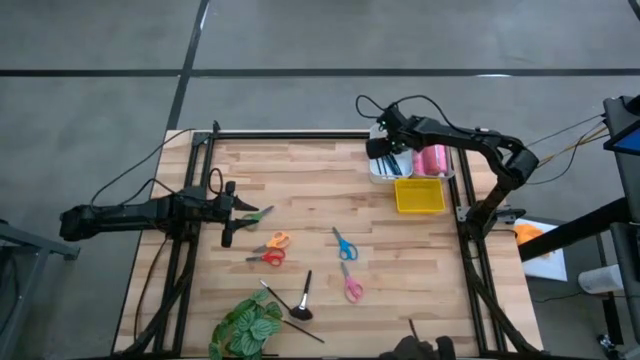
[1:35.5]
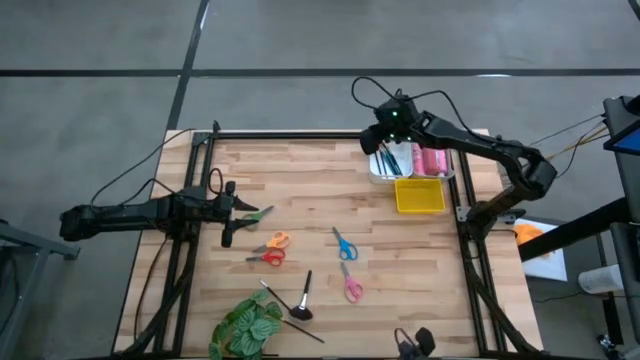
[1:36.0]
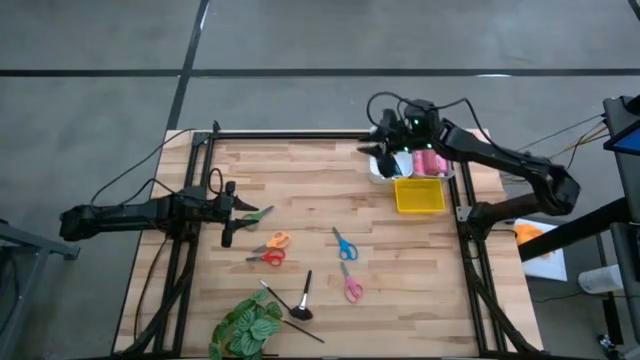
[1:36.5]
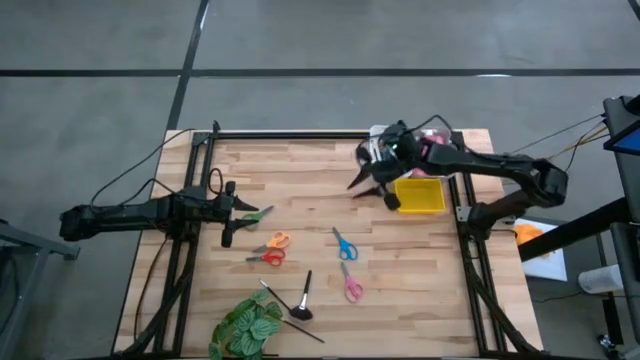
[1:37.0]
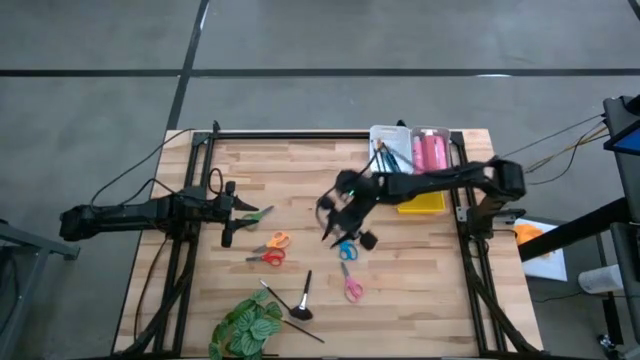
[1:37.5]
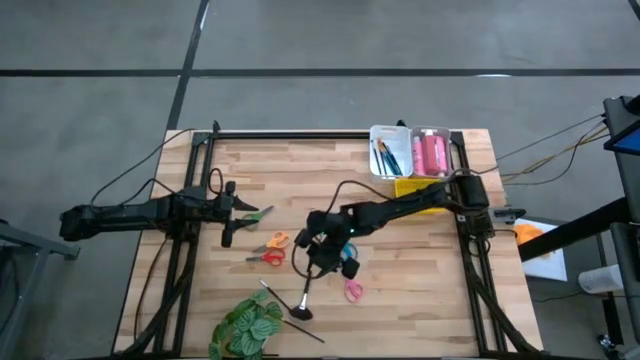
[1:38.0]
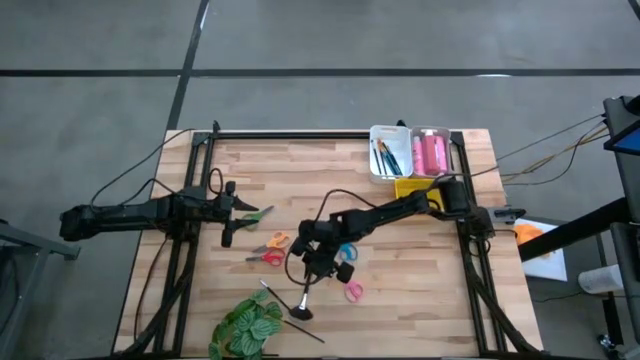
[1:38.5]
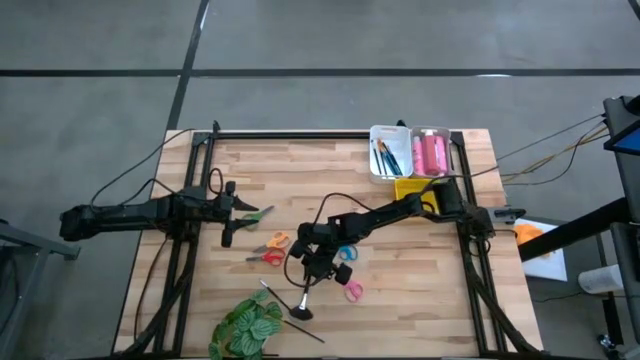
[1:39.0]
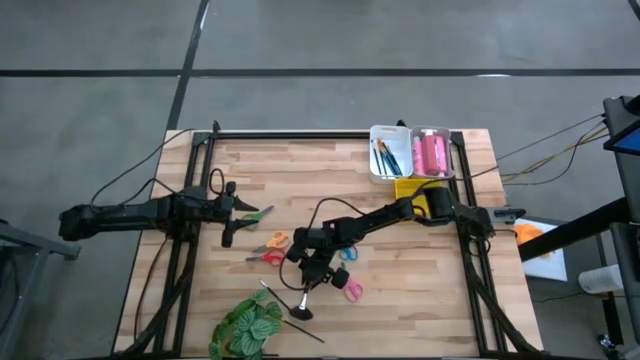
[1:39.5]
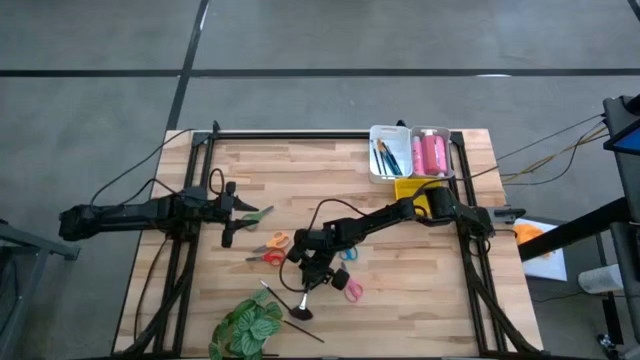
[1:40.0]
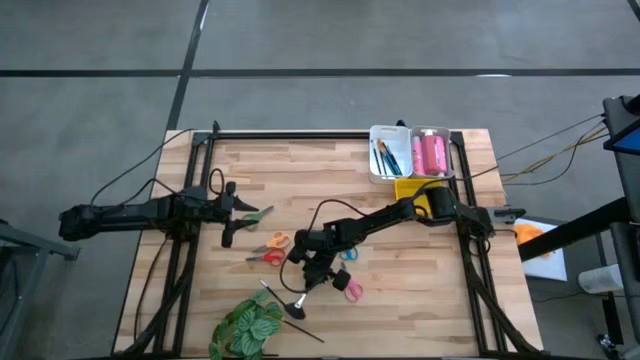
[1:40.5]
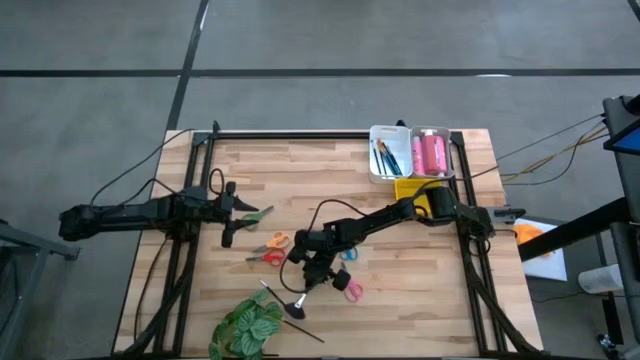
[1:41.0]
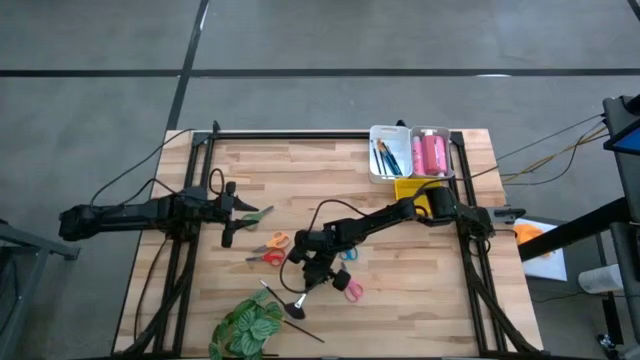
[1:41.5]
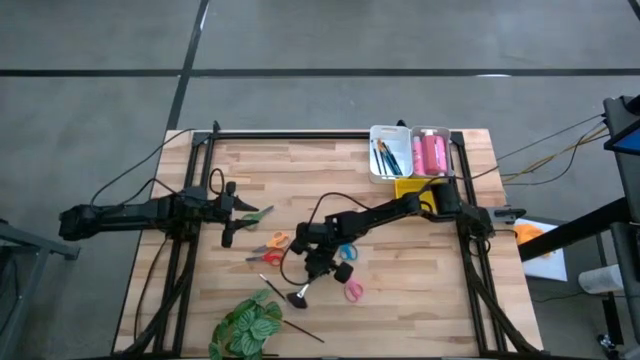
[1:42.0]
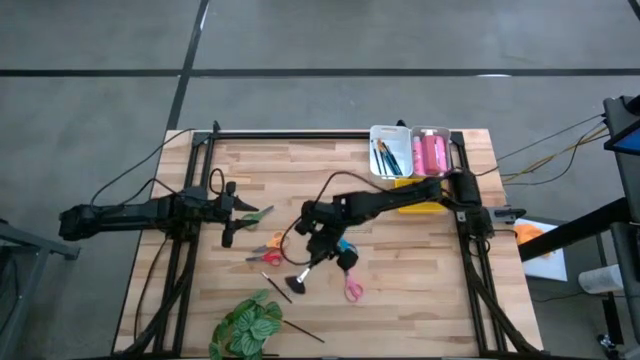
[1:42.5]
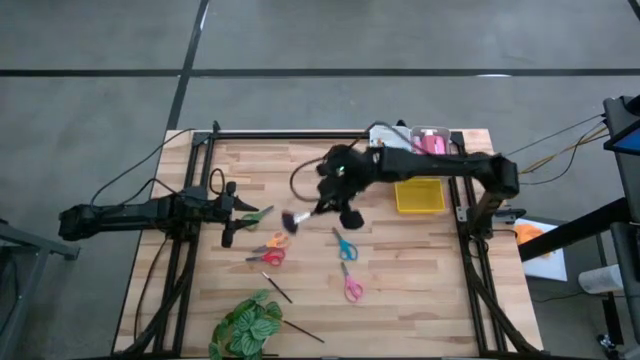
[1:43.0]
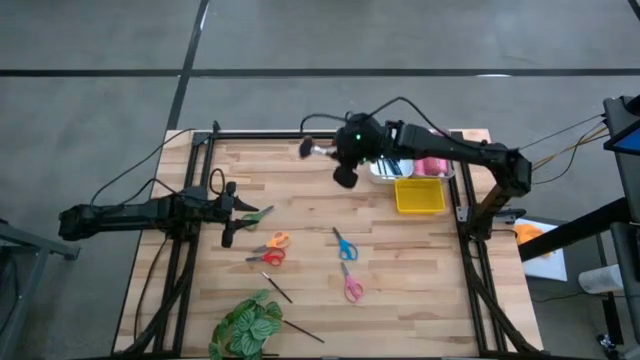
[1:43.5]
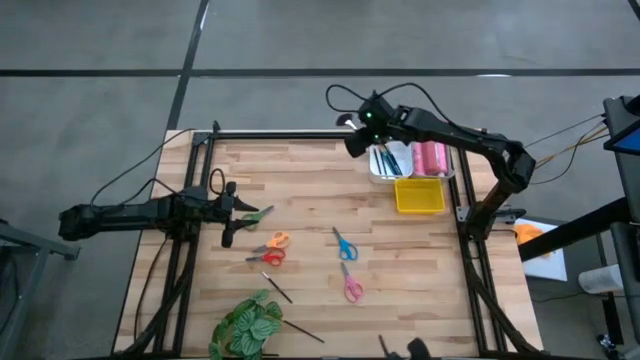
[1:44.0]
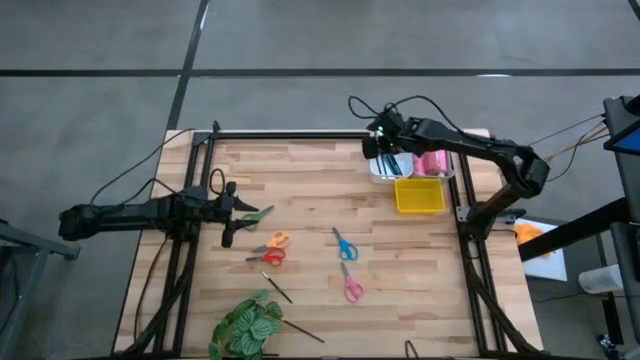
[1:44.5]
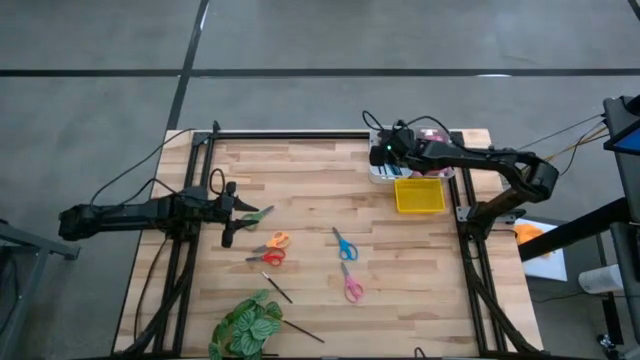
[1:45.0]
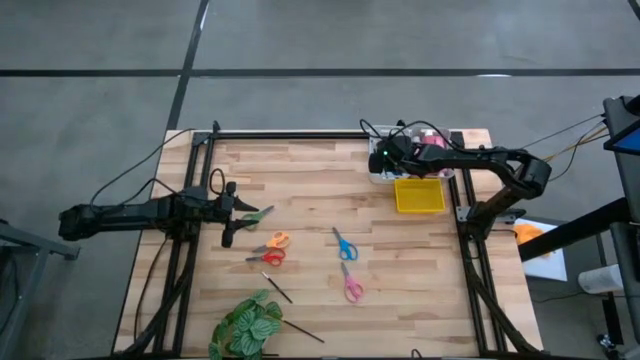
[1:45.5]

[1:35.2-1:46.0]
Task: Pick & Place Paint Supplies
Put the black paint brush into the white bin

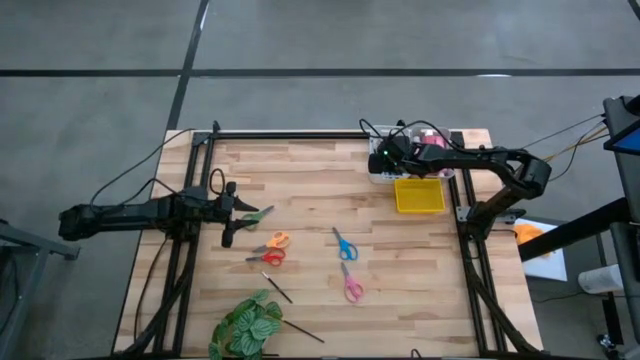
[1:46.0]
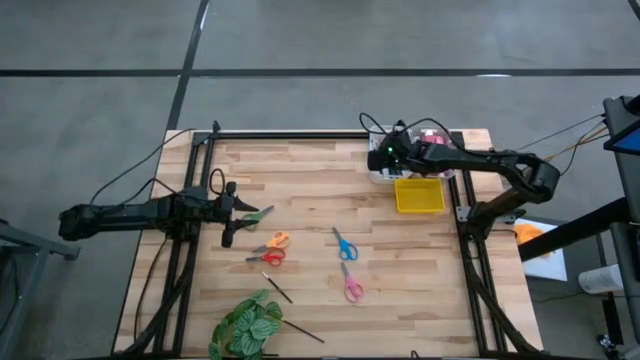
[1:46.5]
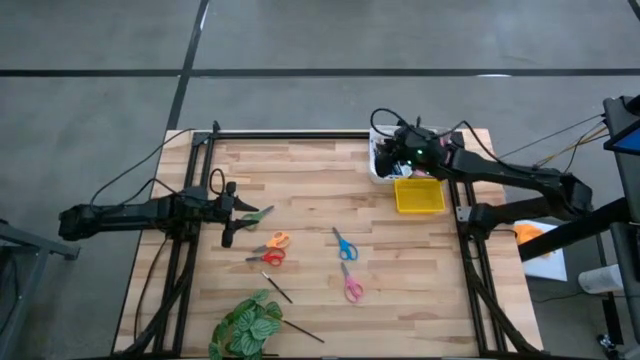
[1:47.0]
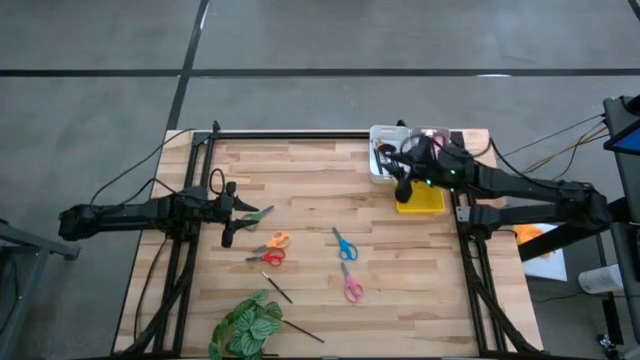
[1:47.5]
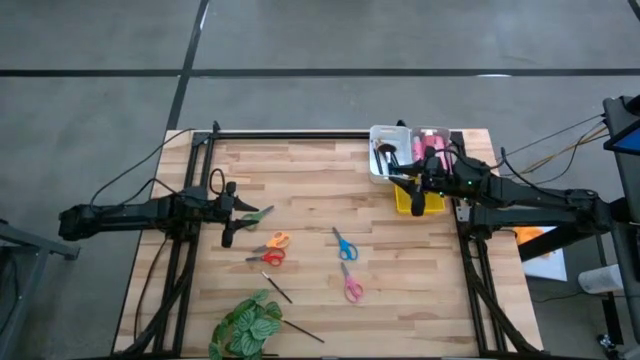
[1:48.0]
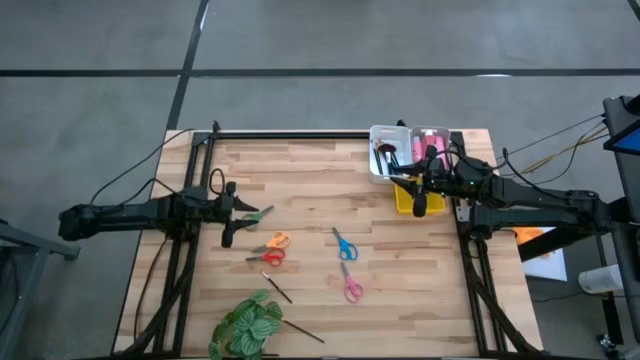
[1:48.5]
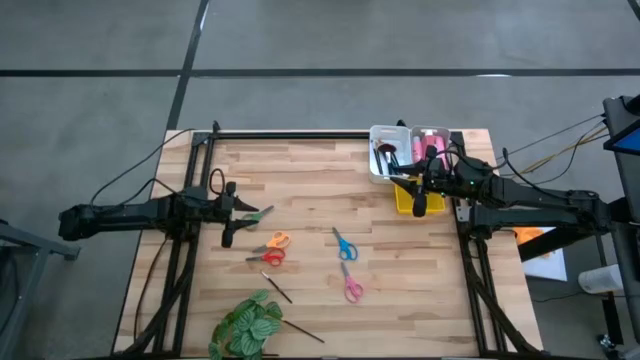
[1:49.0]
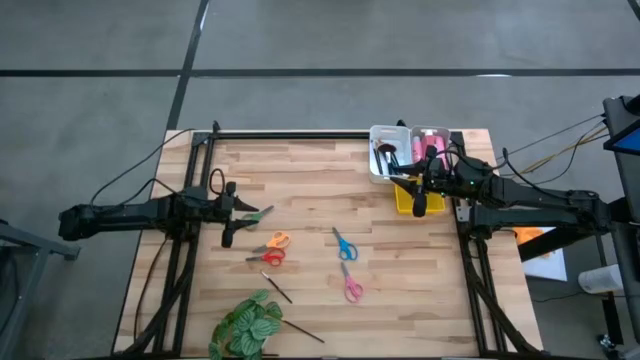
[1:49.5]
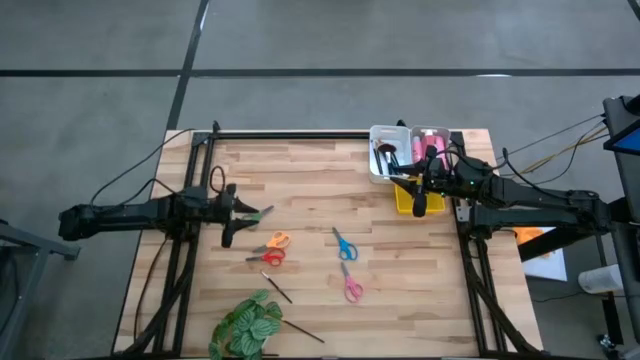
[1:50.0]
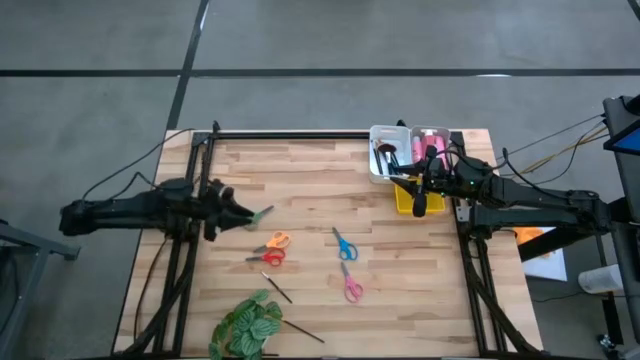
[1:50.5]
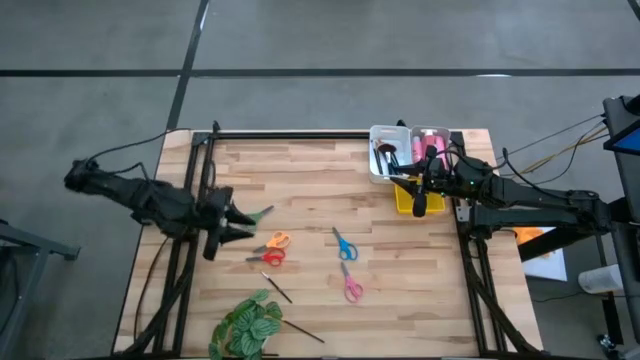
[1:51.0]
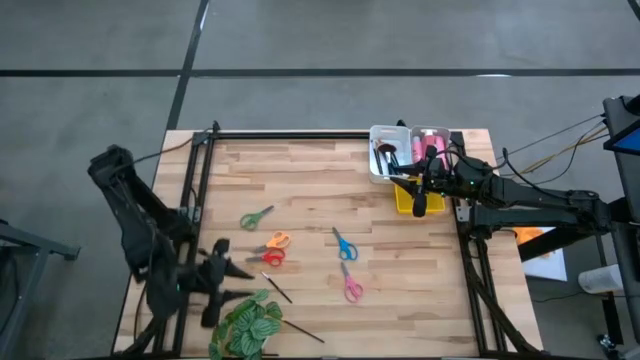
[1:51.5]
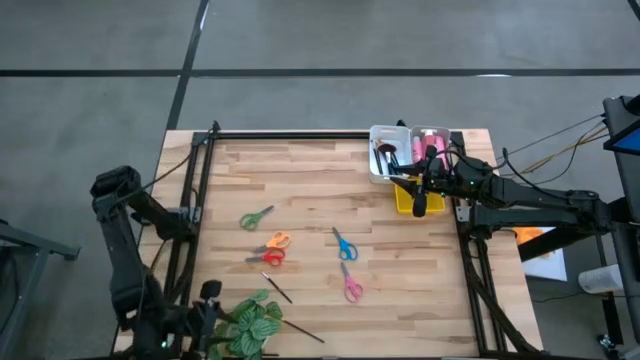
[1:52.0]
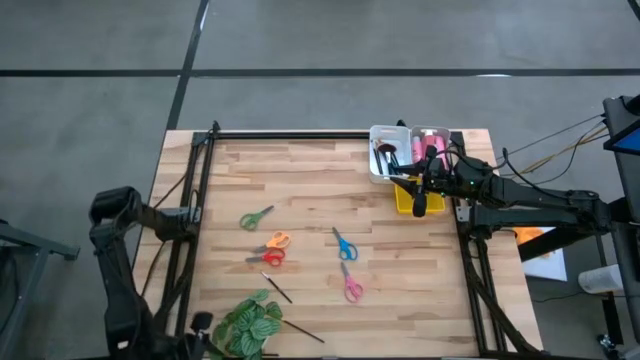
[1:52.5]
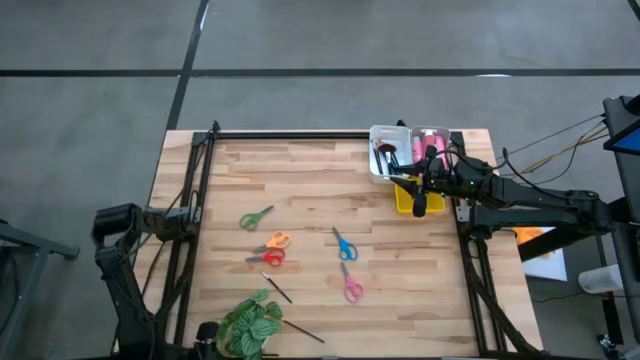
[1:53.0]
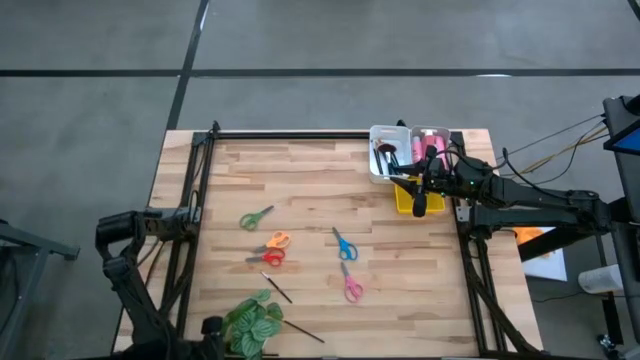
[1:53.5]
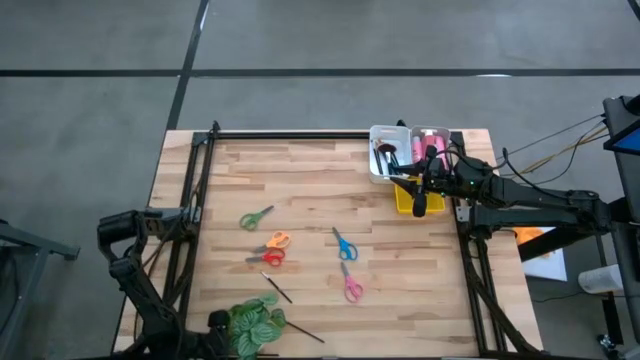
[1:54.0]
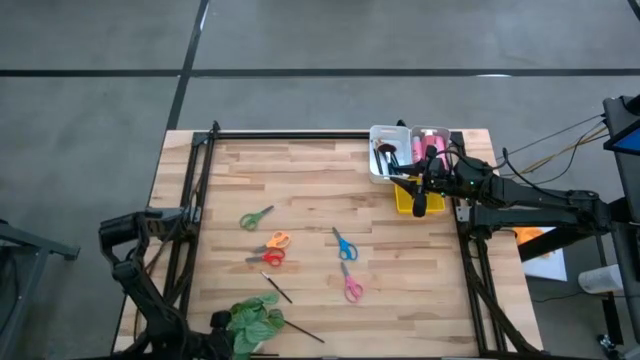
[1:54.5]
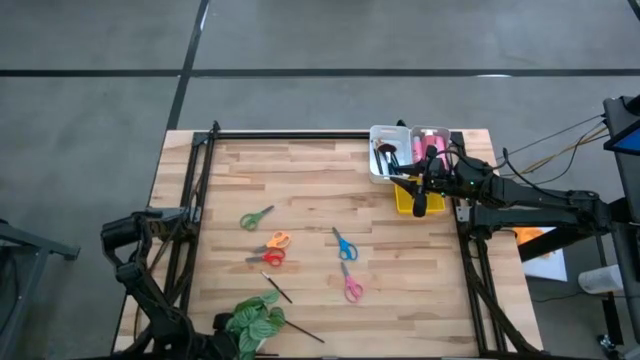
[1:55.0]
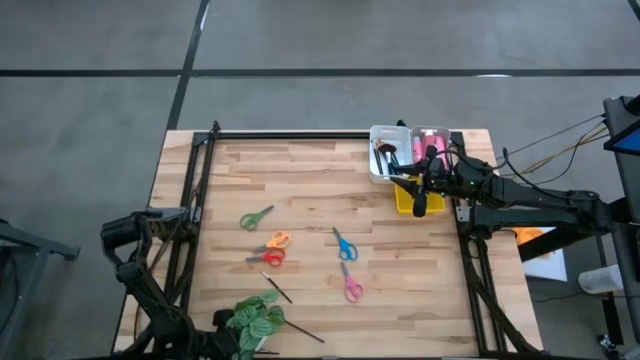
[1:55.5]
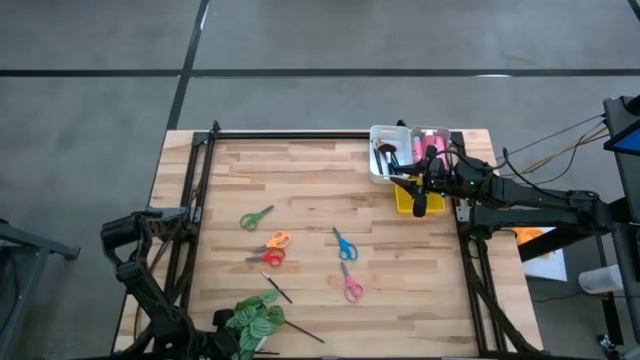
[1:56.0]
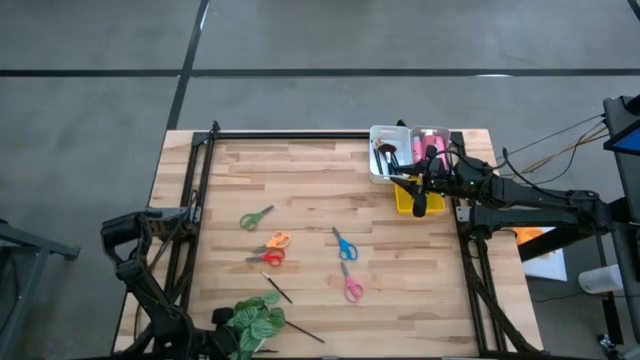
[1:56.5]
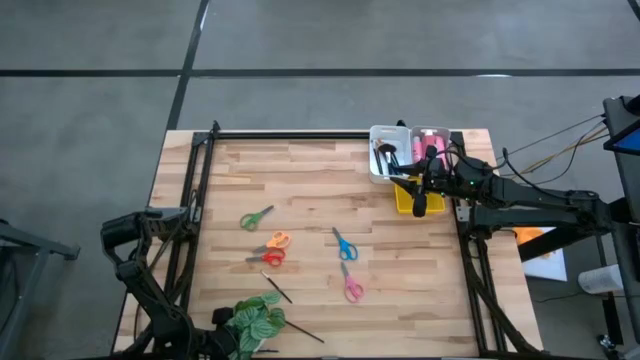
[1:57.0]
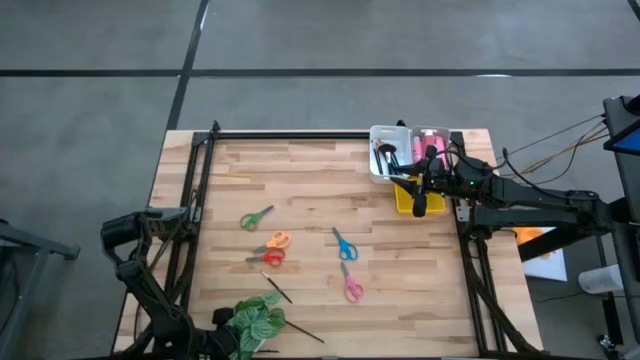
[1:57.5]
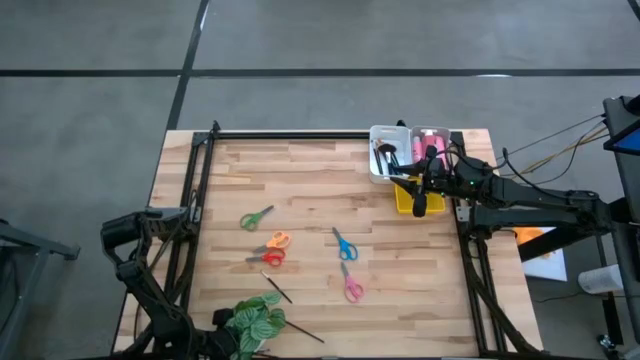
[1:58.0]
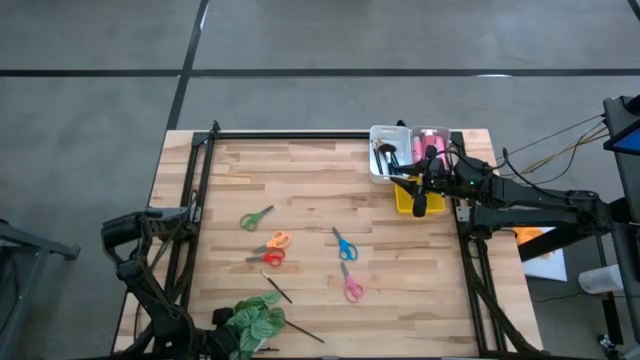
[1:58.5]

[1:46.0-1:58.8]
Put the black paint brush into the white bin
